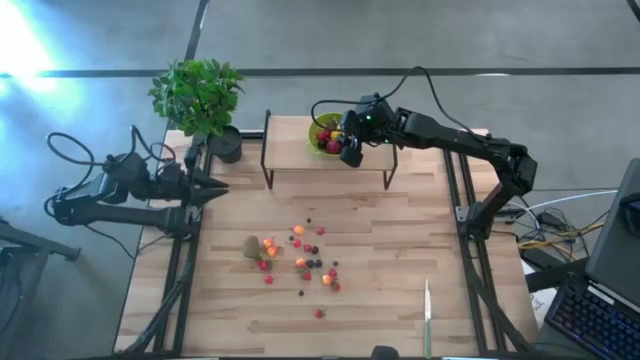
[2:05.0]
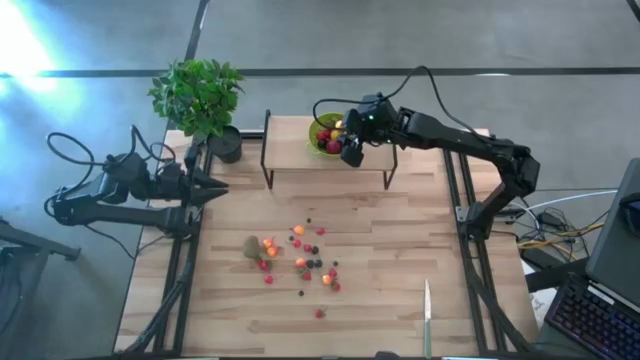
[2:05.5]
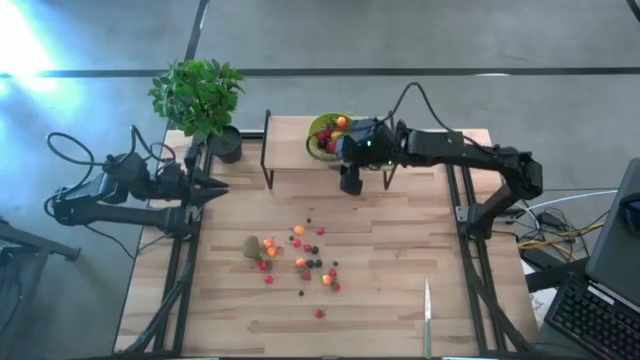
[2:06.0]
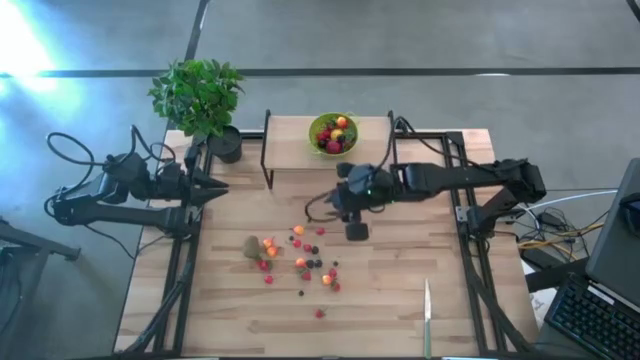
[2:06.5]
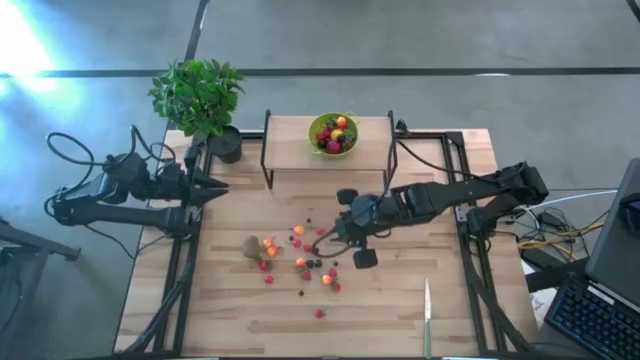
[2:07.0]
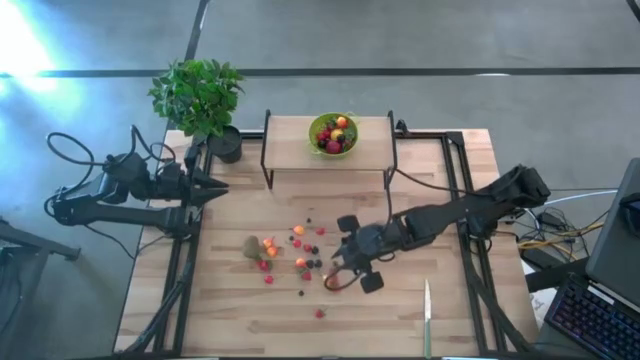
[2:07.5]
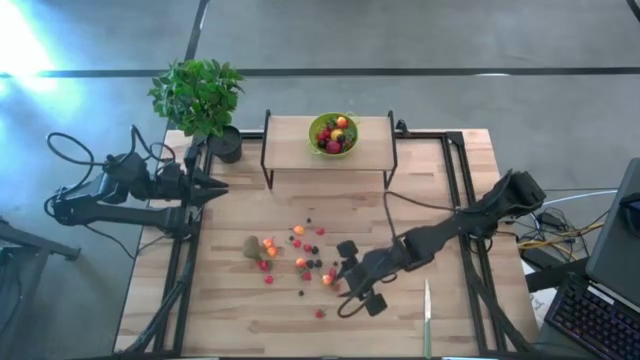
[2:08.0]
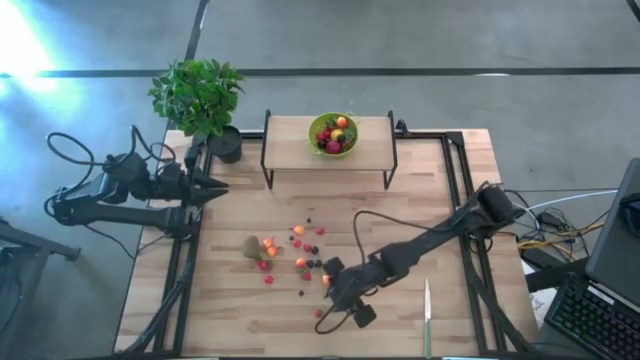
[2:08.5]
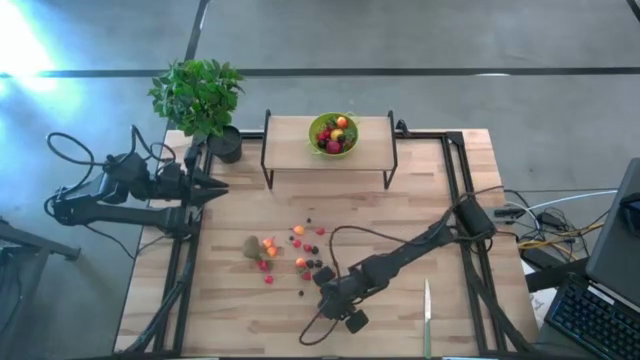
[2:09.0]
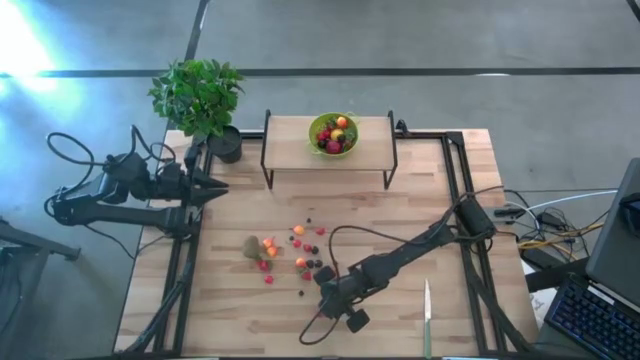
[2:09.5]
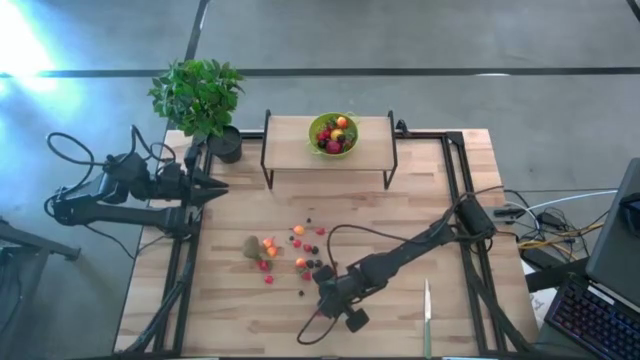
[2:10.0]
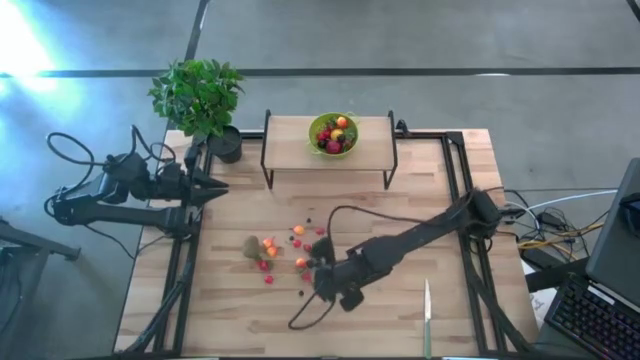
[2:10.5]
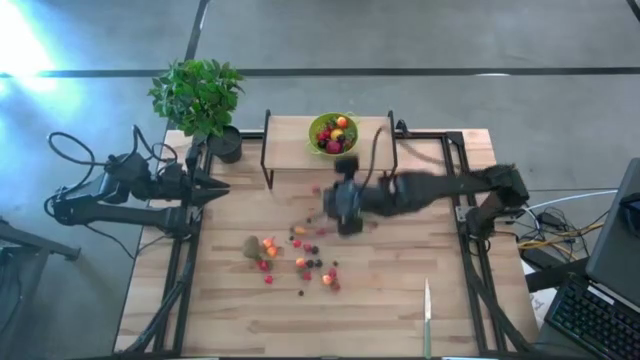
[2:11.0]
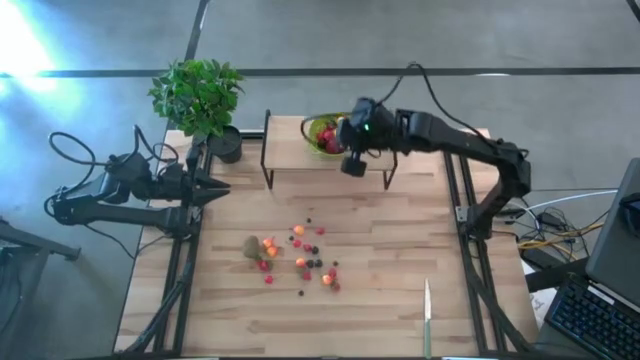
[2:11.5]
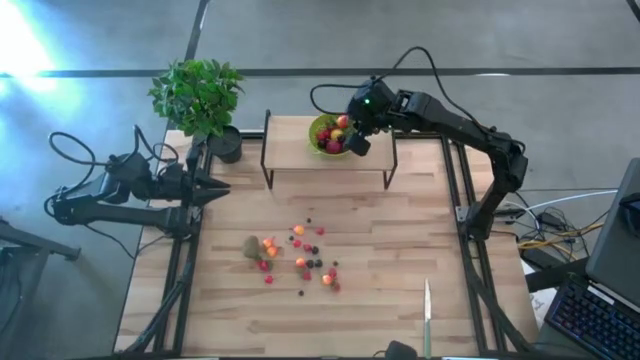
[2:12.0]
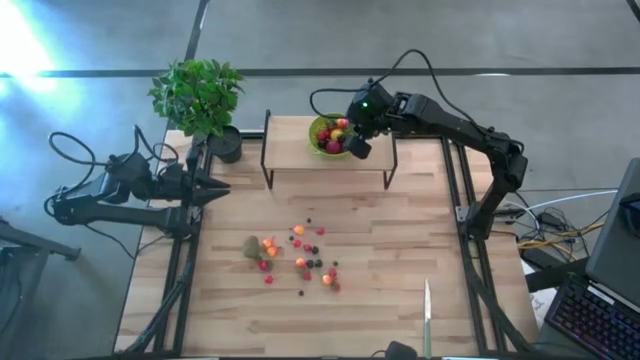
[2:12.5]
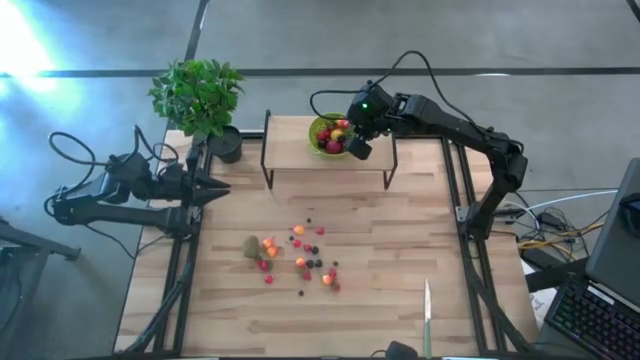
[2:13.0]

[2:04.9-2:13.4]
Task: Pick & Place Fruit
Put the red strawberry into the green strainer bowl on the shelf

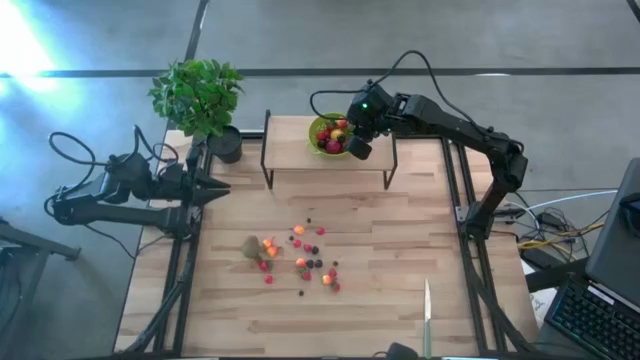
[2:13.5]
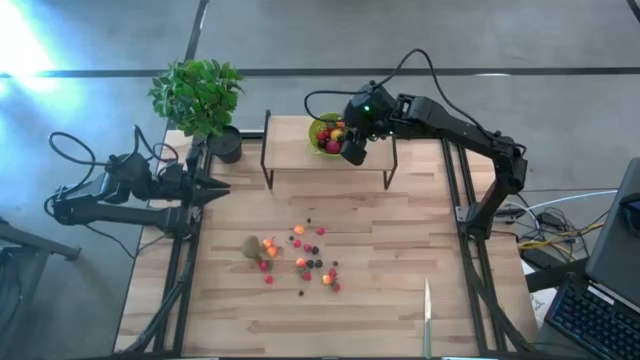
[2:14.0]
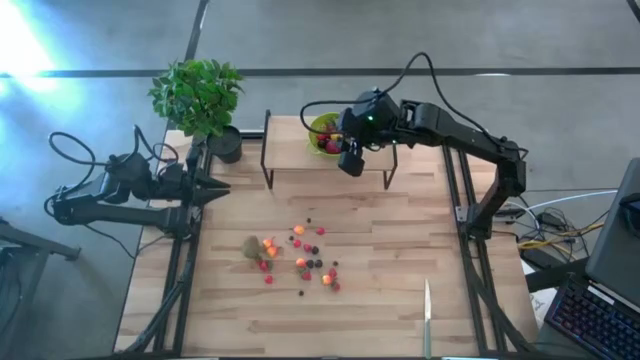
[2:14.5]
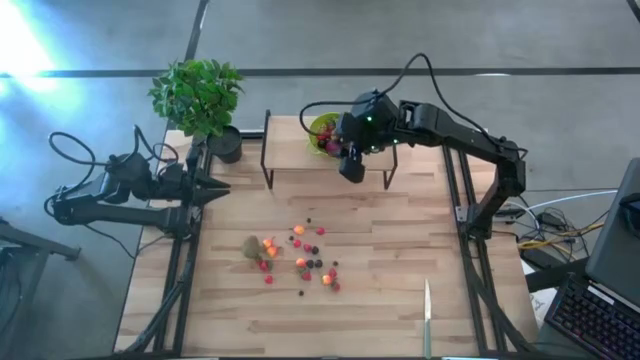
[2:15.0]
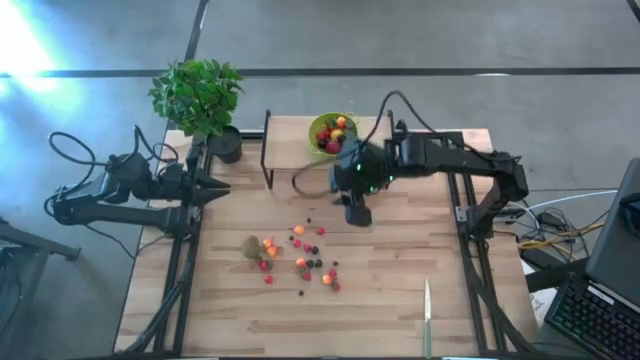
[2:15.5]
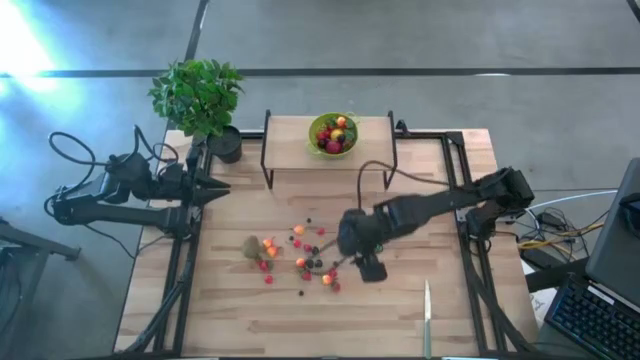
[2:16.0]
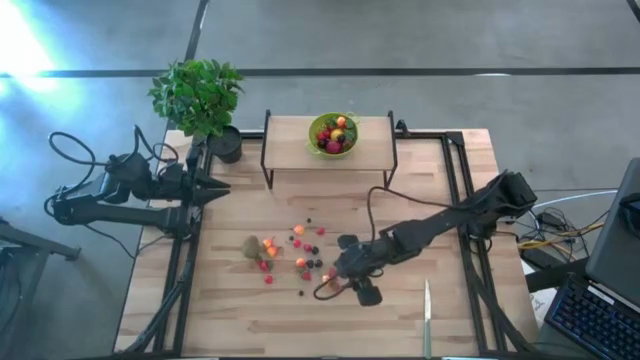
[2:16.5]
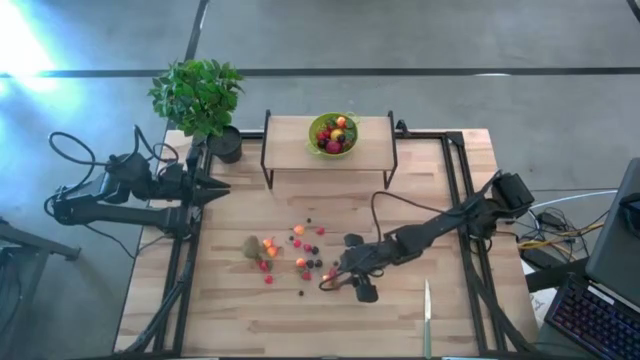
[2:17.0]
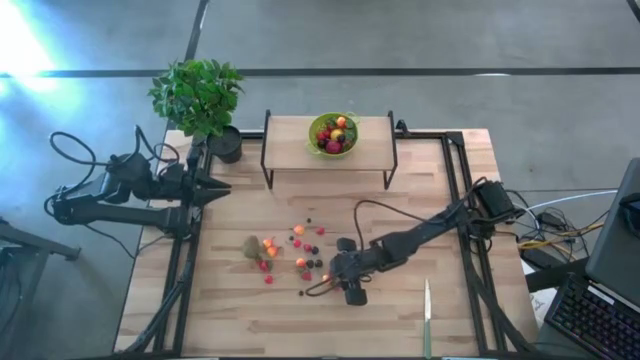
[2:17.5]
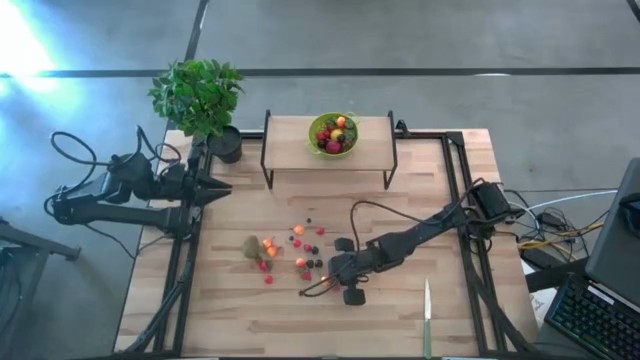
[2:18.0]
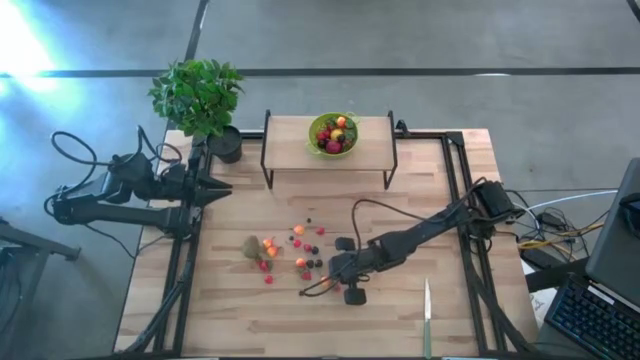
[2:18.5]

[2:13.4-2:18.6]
Put the red strawberry into the green strainer bowl on the shelf

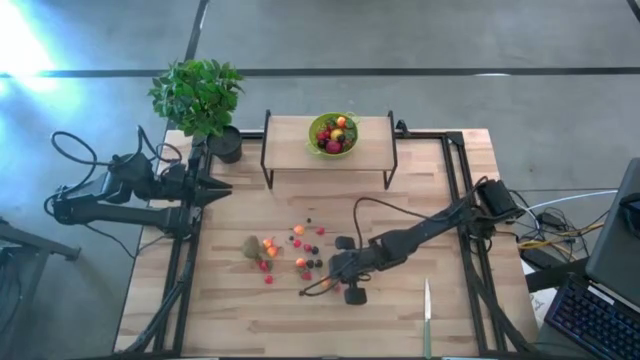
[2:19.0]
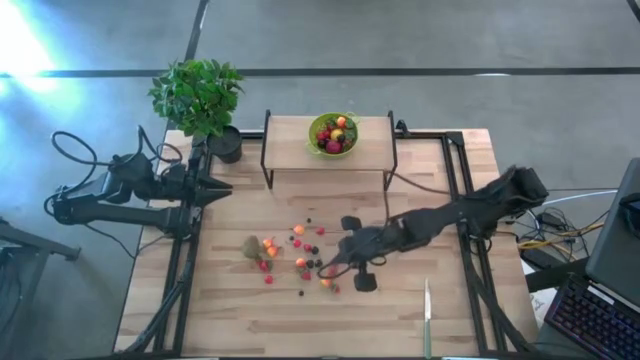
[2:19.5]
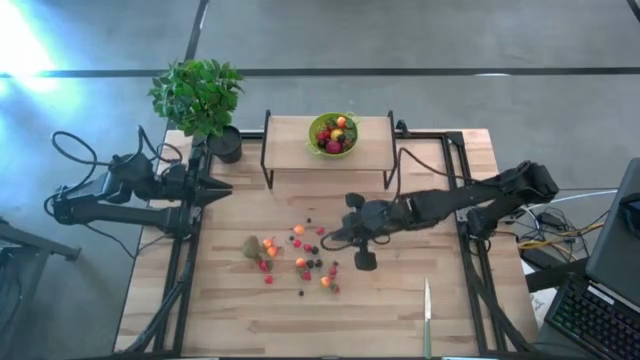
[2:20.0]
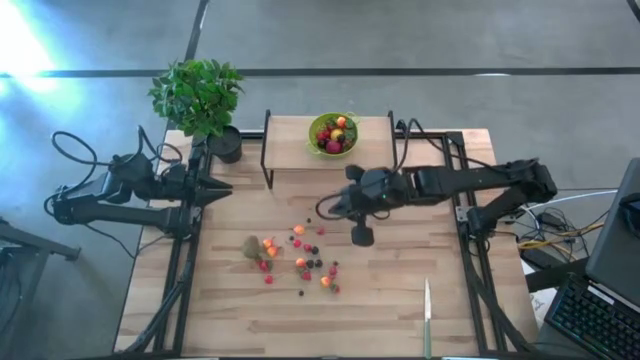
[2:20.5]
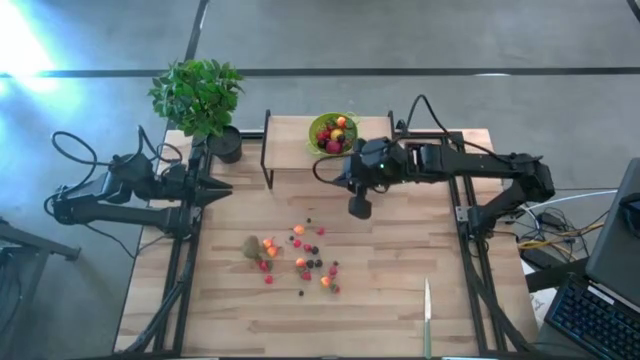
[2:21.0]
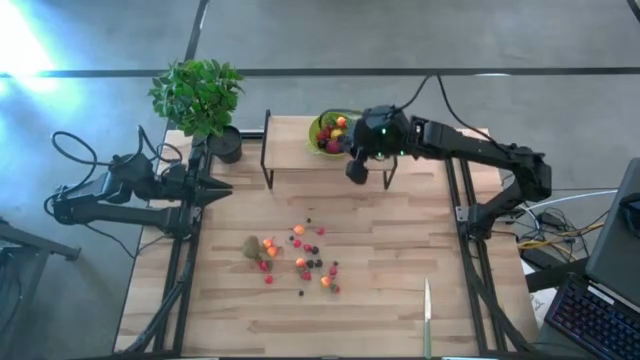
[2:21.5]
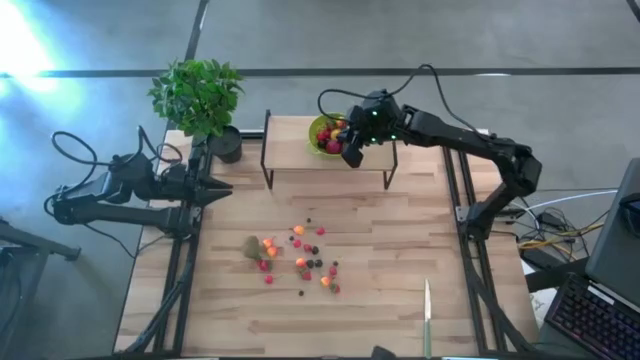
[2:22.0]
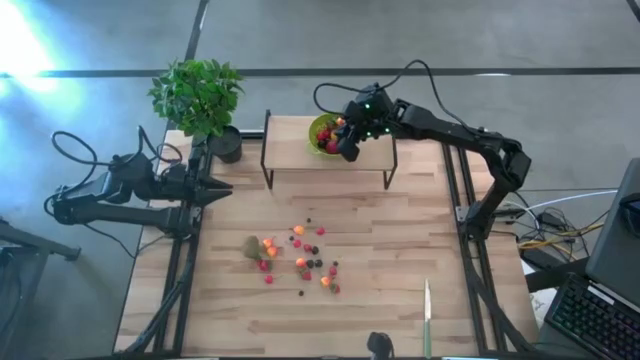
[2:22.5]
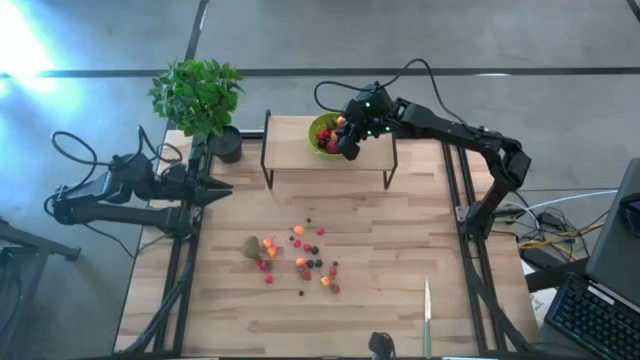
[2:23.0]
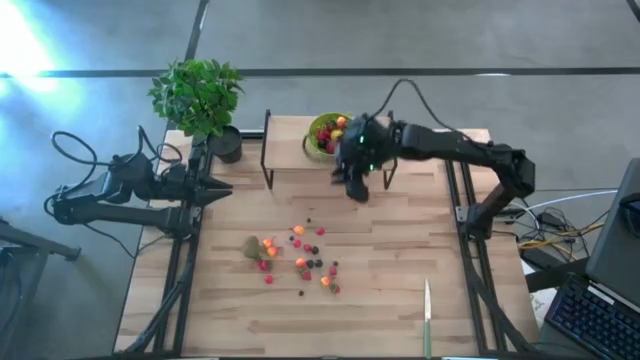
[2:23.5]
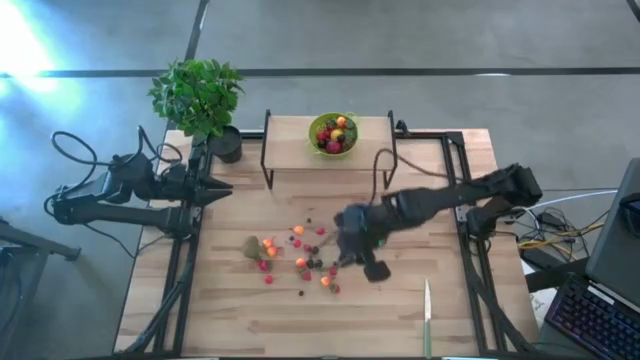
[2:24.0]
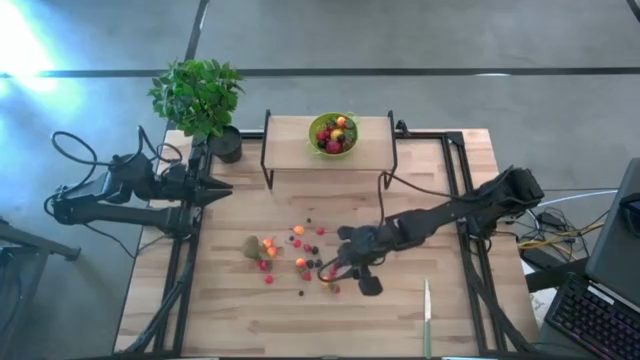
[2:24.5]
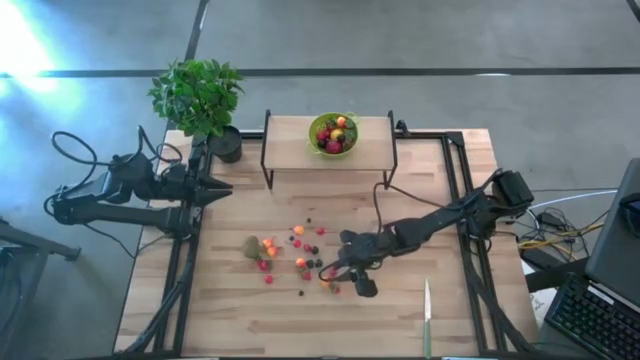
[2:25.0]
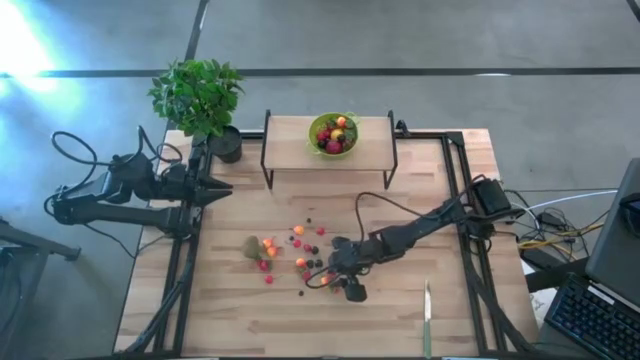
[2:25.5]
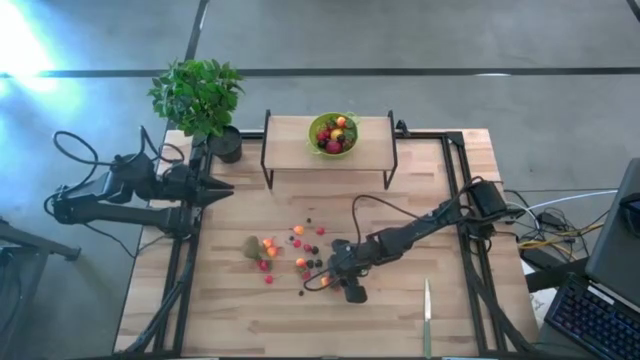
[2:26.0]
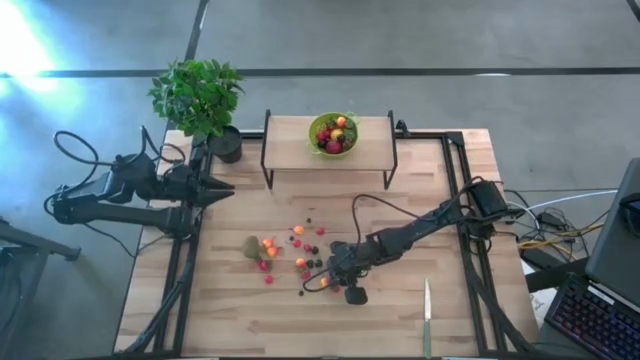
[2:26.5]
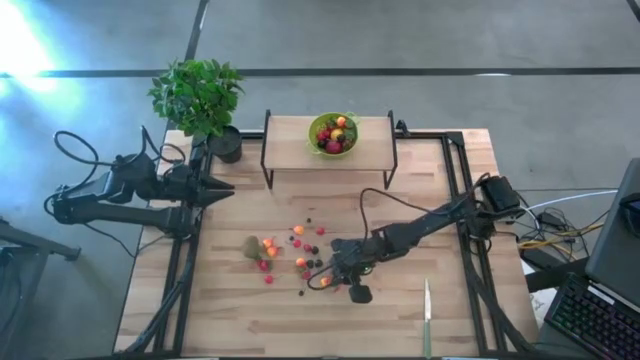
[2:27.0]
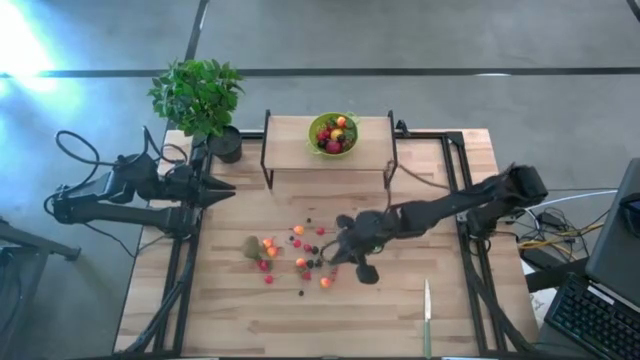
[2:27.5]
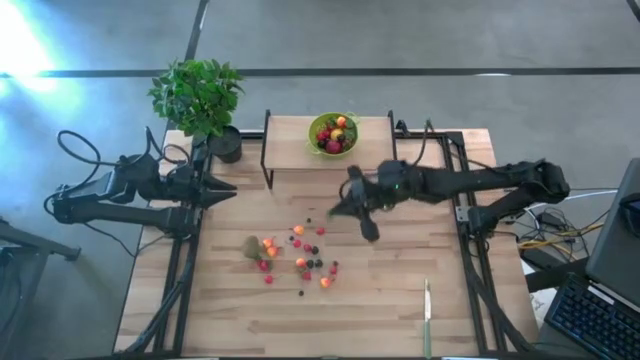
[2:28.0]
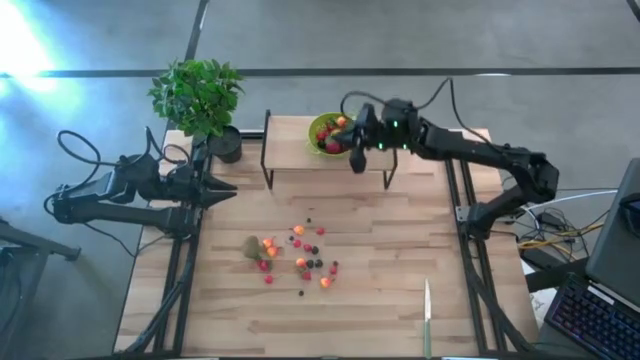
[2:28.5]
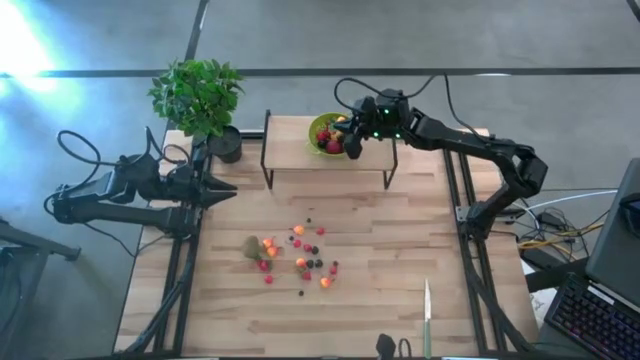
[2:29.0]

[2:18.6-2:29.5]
Put the red strawberry into the green strainer bowl on the shelf
